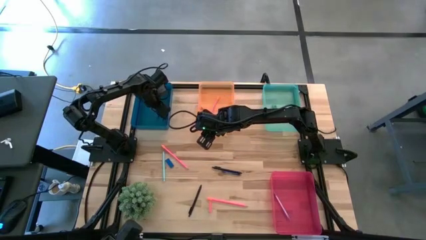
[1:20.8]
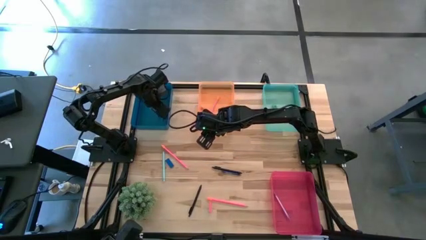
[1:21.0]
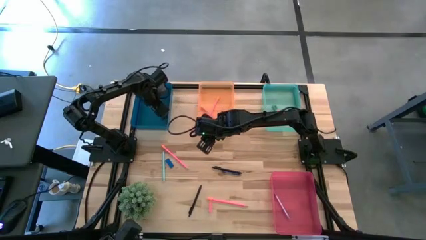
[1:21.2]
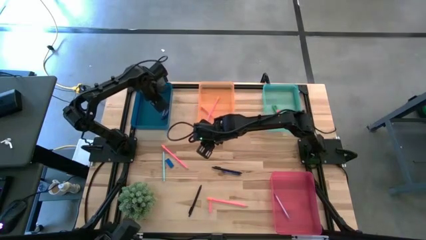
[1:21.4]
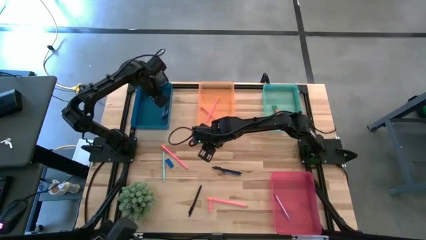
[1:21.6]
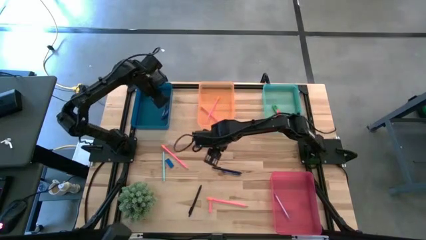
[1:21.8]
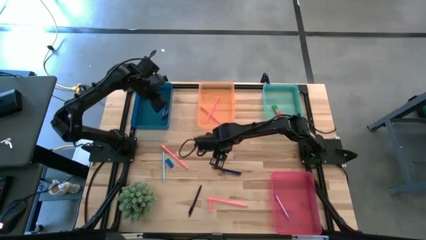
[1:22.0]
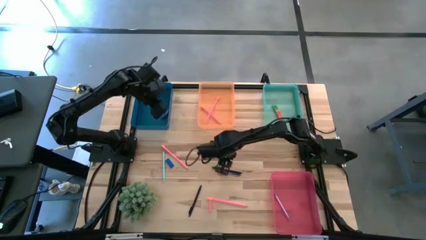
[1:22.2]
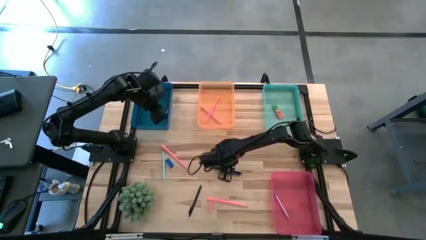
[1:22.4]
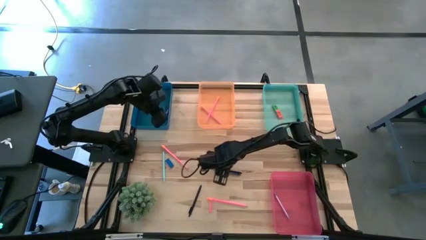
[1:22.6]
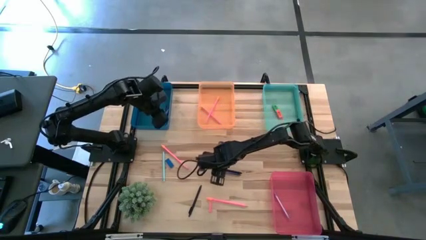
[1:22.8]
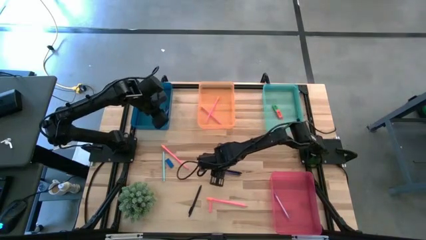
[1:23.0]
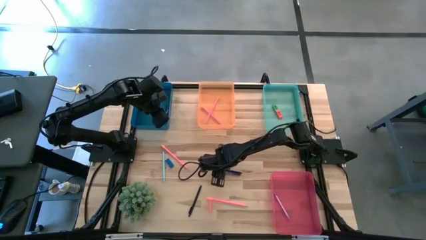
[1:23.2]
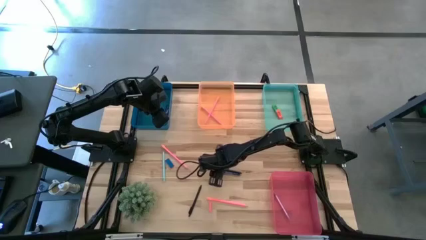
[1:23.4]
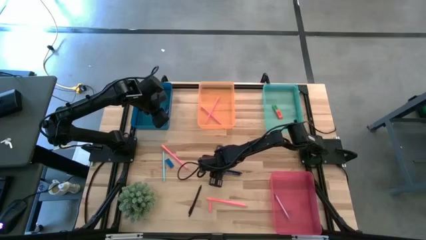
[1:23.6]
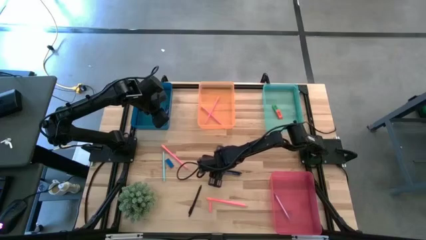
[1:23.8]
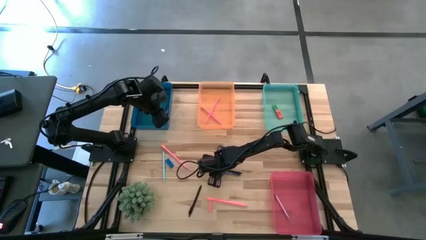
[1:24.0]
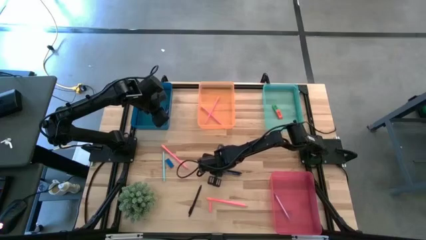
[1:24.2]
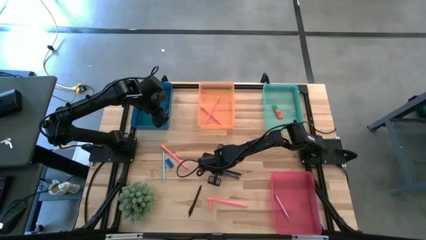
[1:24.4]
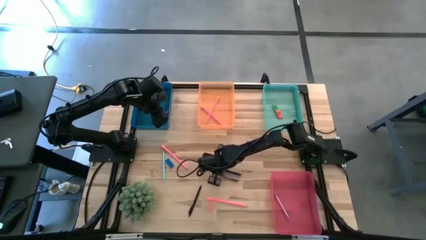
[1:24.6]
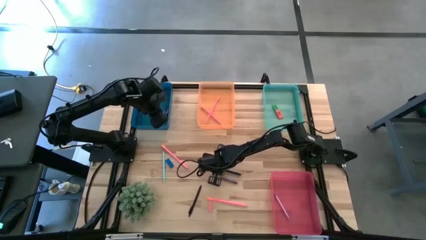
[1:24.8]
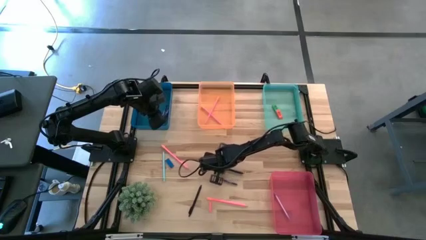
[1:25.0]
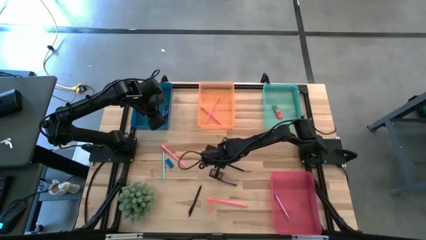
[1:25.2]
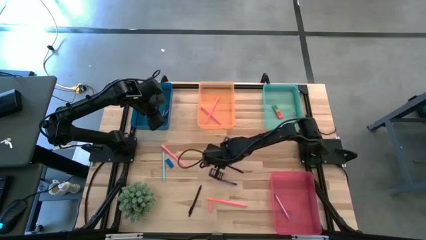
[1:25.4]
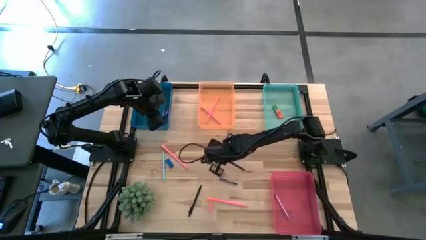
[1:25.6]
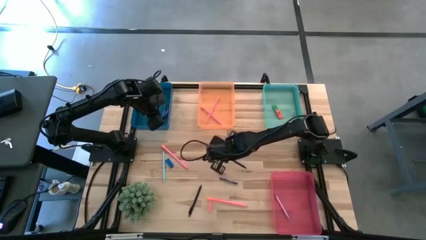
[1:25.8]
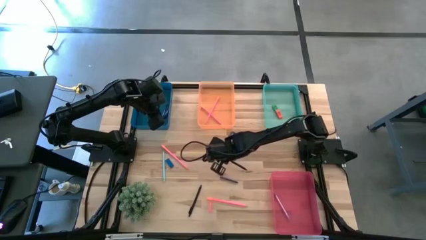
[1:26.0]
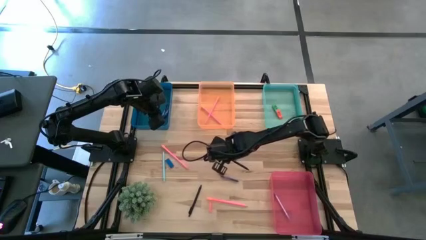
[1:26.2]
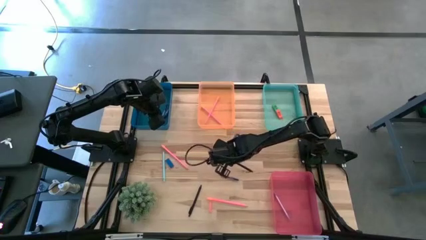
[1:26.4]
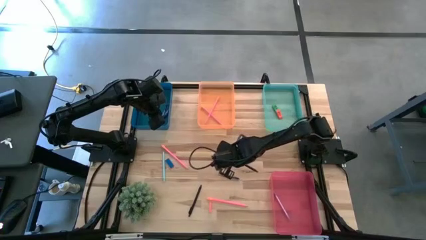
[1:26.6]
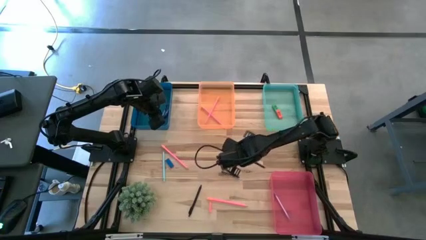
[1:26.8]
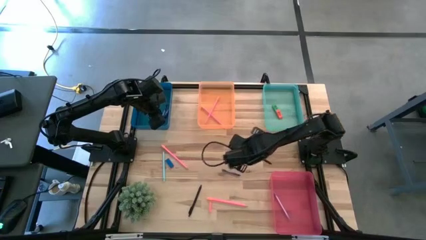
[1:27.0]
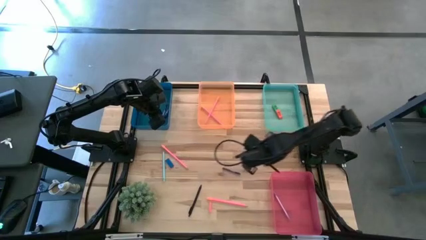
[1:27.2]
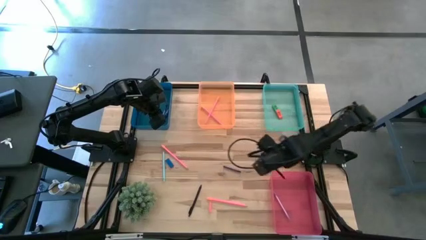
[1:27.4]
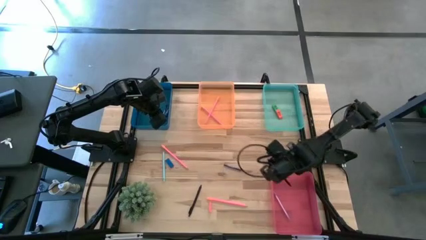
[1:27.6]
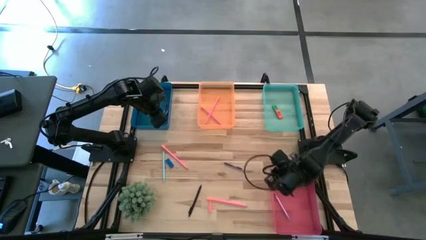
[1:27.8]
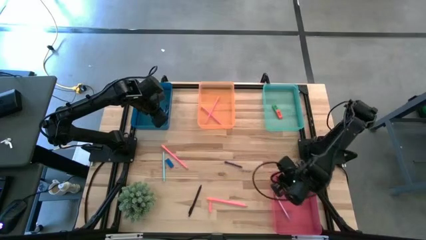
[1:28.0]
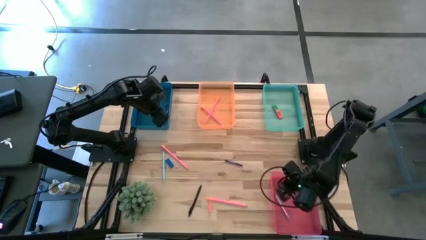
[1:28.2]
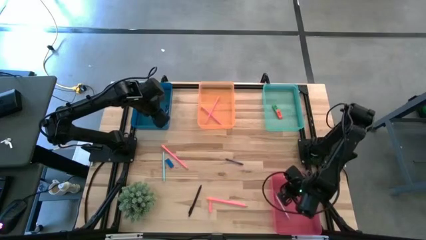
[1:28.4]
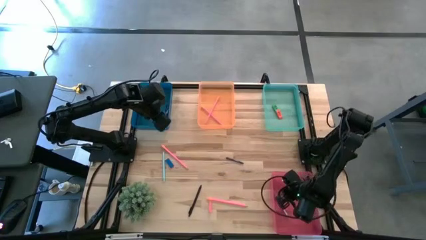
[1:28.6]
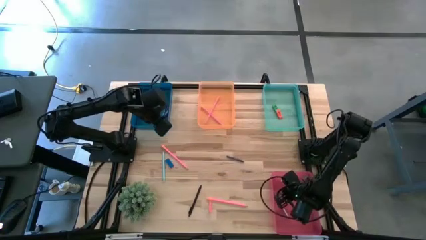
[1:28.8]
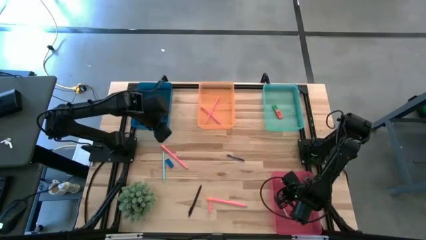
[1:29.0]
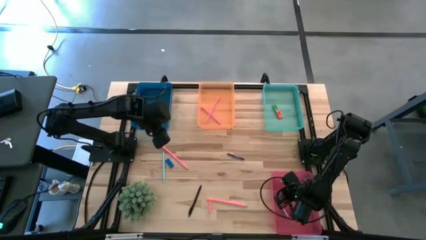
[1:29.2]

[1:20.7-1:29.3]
Task: Sort crayons/erasers/pens/pencils in bins
Put the black pen into the pink bin

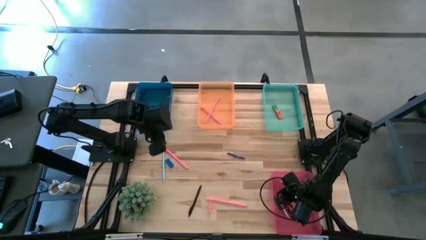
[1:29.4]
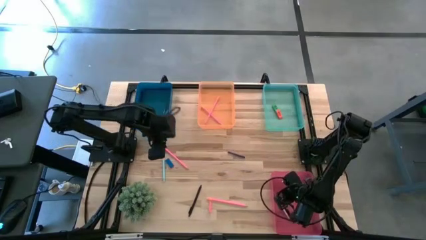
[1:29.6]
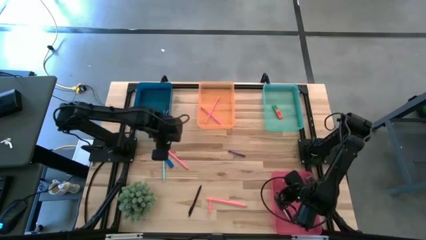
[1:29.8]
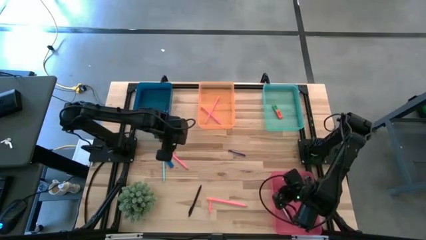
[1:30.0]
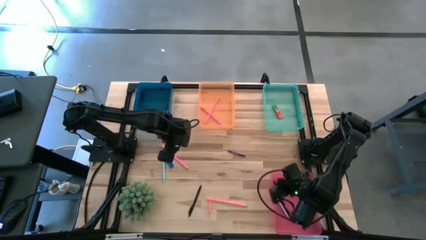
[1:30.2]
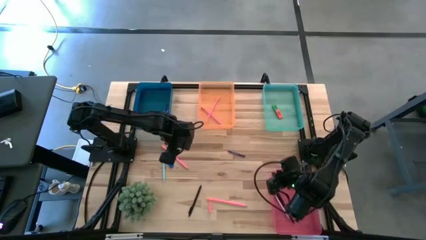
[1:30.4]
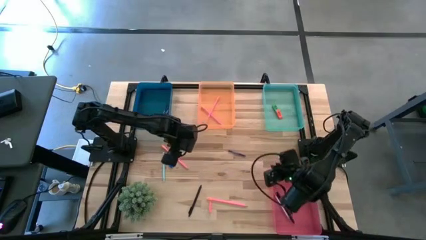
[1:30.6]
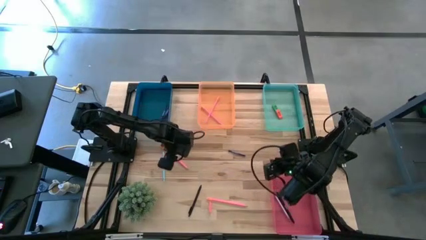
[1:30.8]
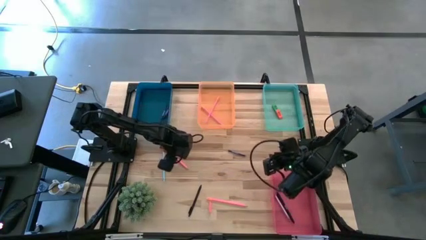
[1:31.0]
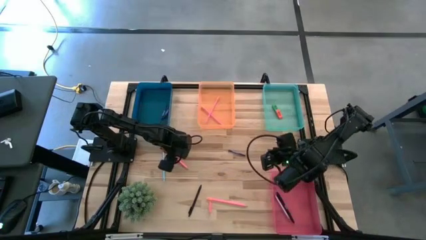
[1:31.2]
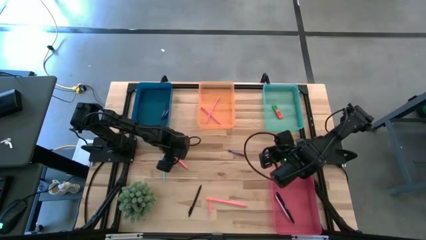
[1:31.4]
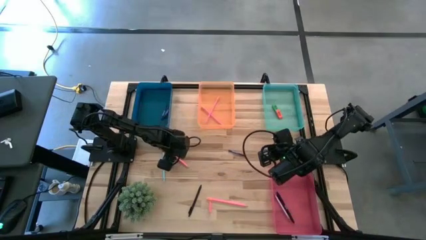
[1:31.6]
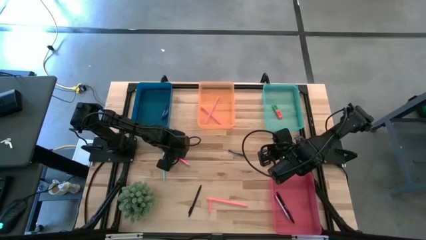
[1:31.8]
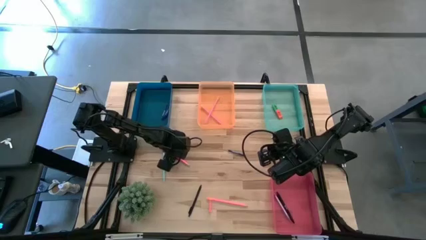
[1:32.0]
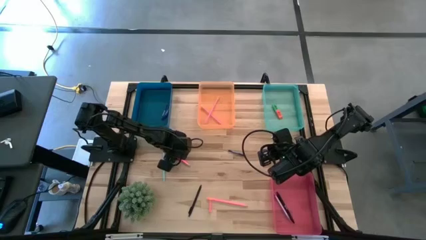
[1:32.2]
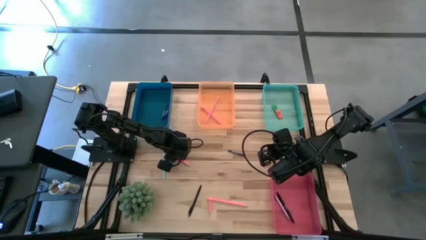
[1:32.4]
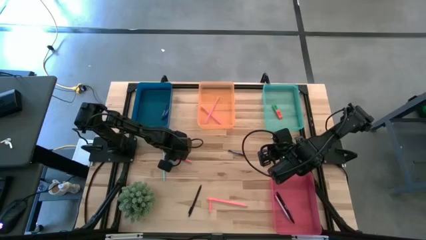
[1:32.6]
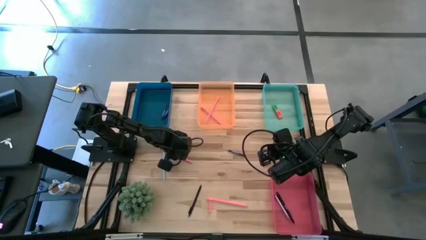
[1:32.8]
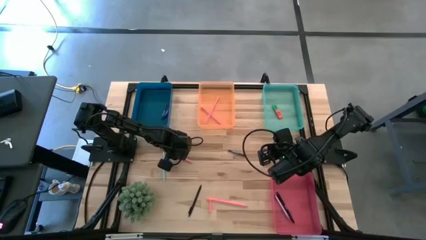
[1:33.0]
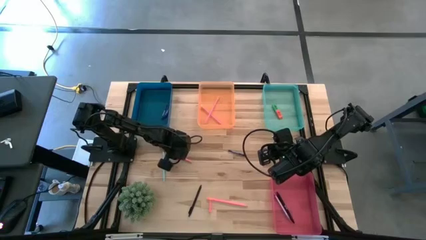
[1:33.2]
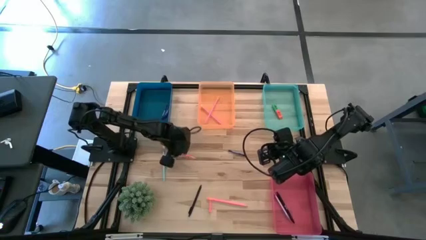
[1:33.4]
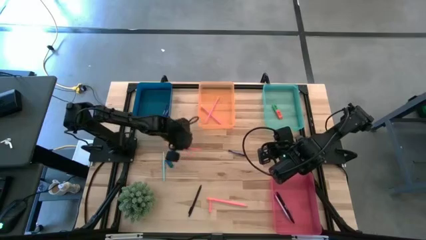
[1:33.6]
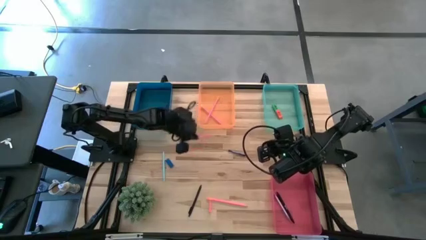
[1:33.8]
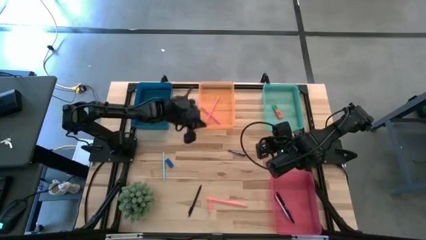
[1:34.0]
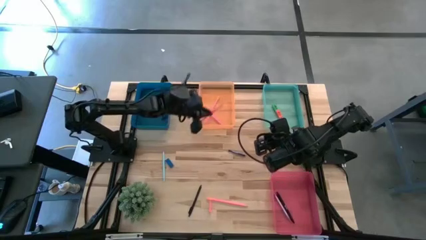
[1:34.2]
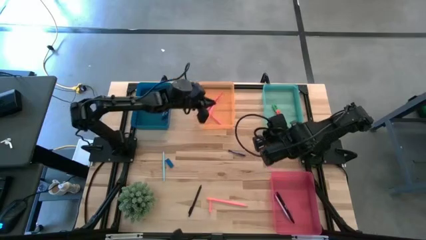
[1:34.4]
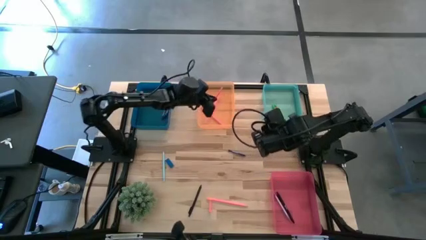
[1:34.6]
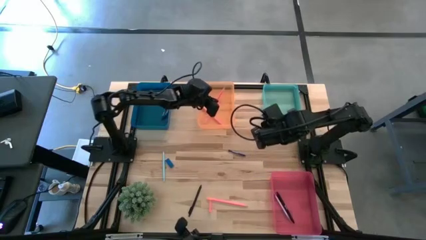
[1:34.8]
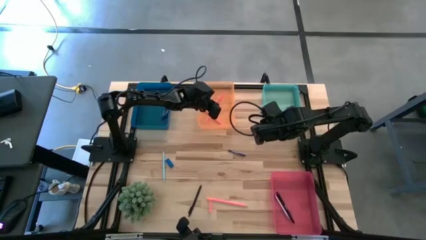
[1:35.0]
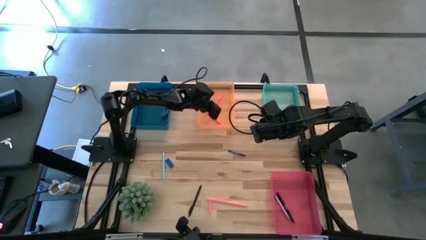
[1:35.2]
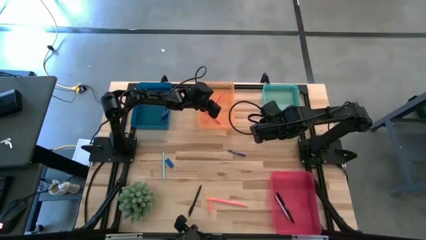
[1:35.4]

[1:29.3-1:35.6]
Put the pink pencil into the orange bin

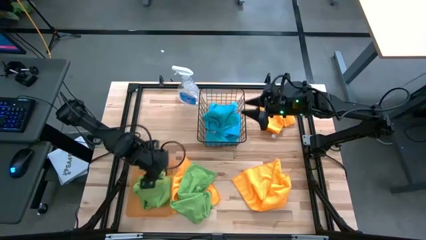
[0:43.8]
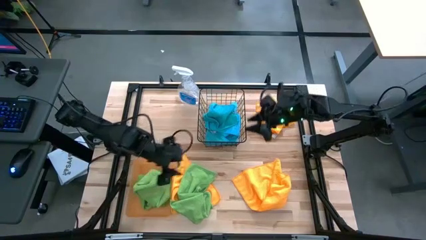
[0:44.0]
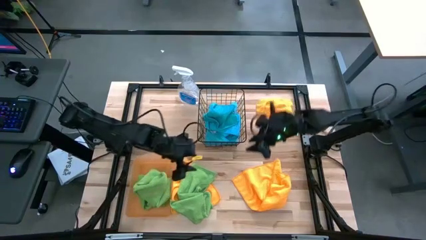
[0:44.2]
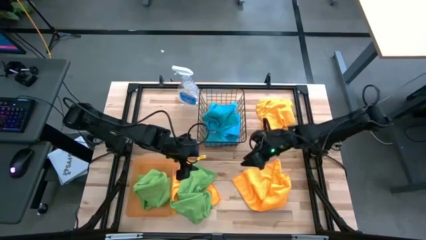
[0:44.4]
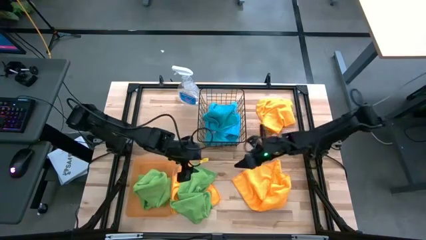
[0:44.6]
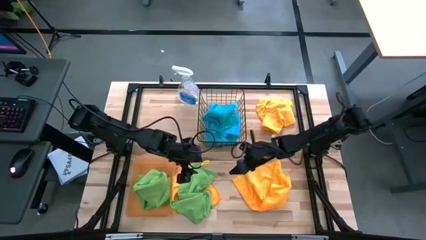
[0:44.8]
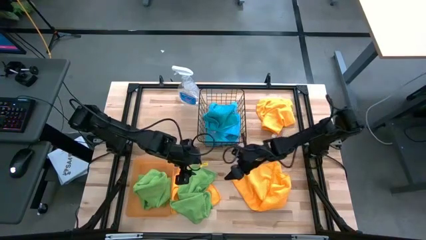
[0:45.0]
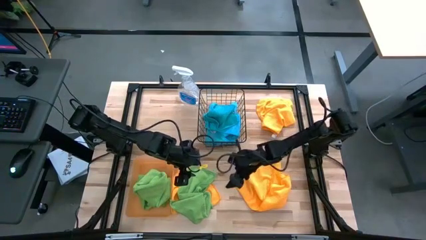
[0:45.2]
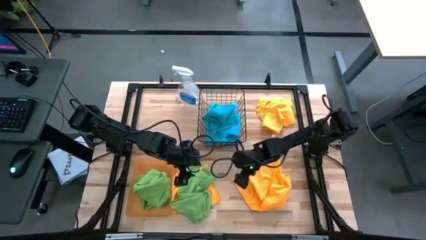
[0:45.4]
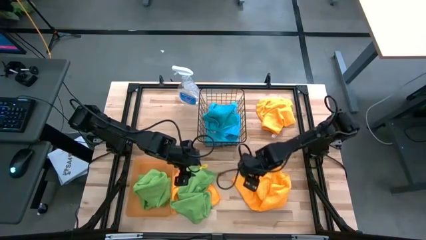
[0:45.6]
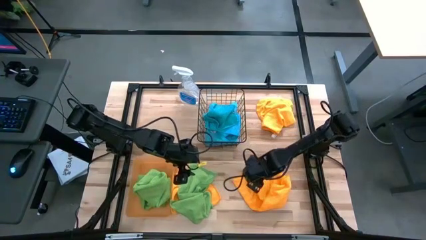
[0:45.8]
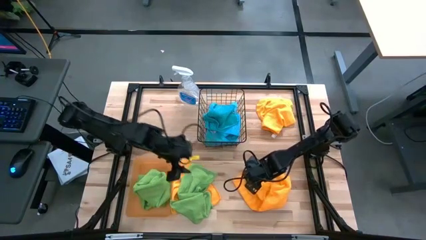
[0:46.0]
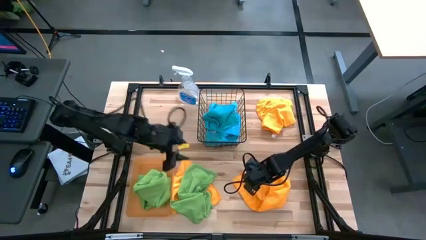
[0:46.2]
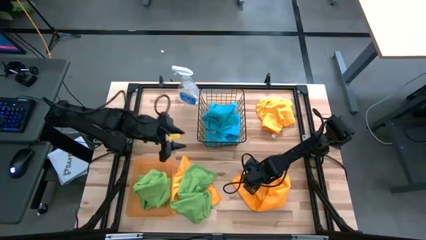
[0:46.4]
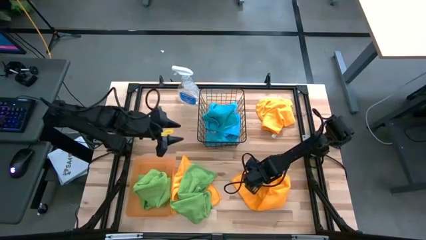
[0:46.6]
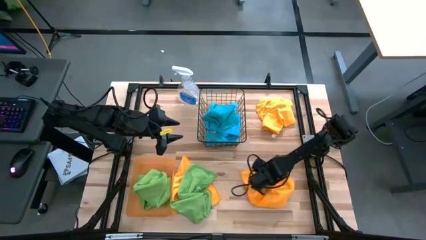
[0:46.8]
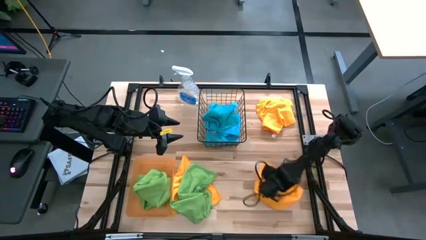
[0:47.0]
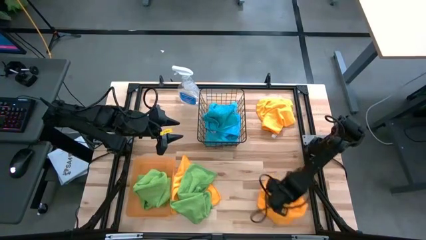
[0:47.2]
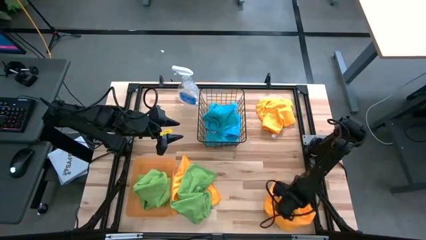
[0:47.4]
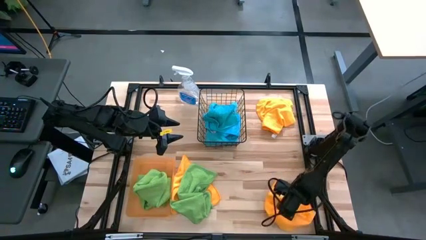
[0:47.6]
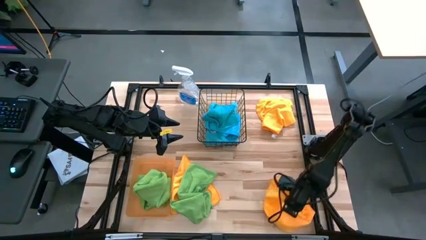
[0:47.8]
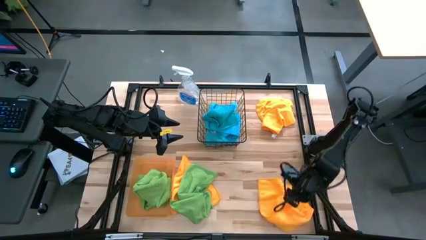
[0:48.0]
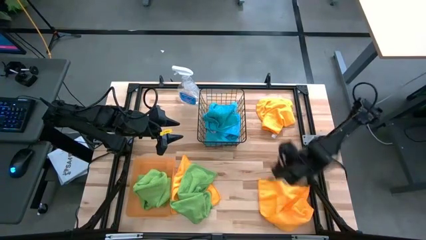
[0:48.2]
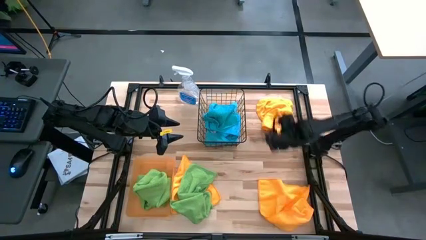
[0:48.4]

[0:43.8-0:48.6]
Task: Sort microfiber towel by color & place in baskets
Adjust the orange towel from the middle right to the bottom right
